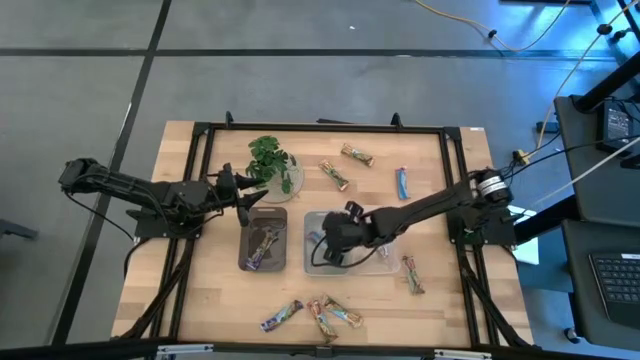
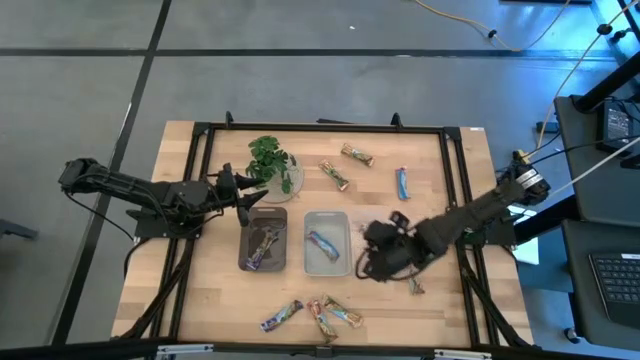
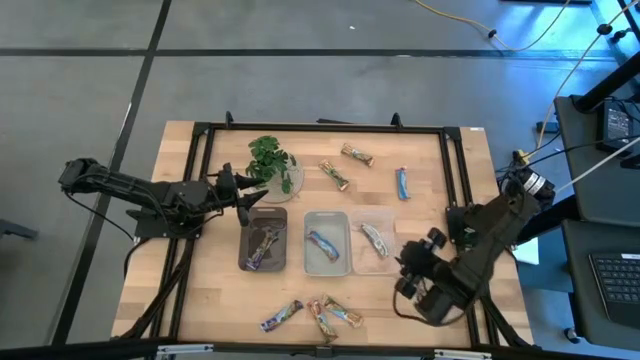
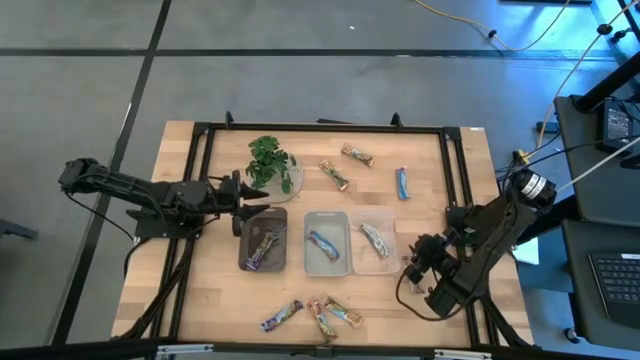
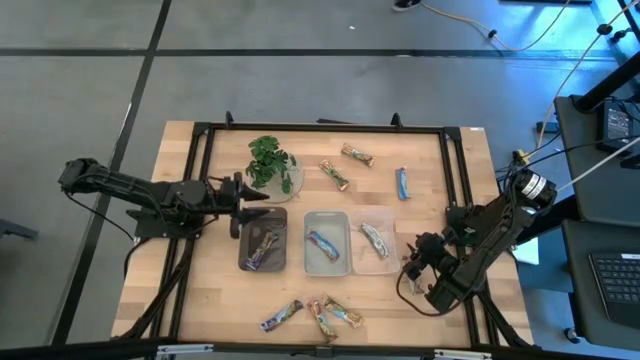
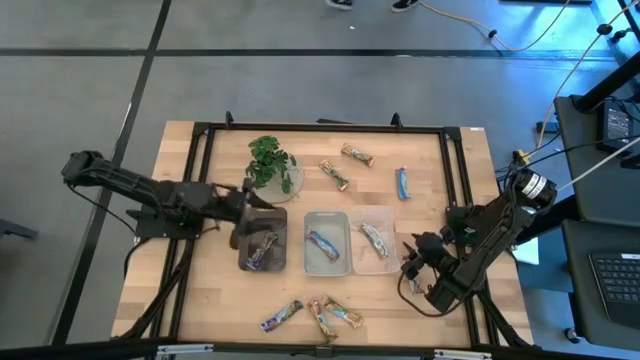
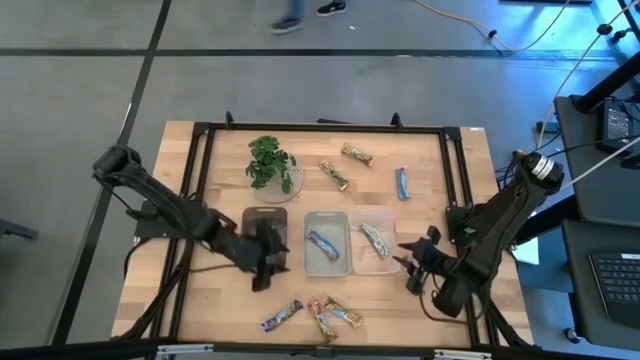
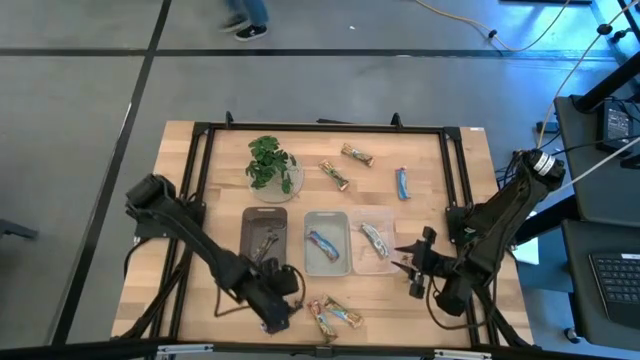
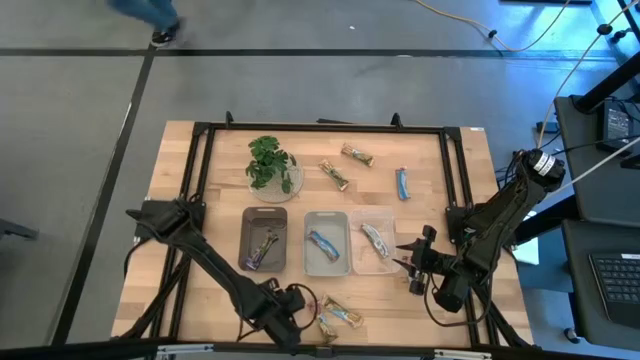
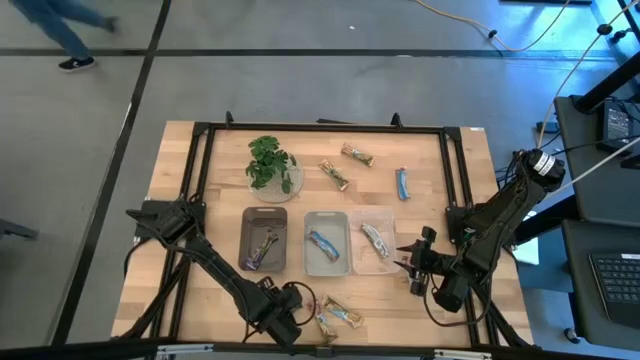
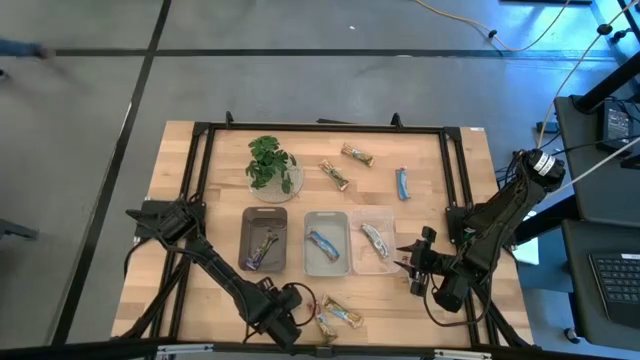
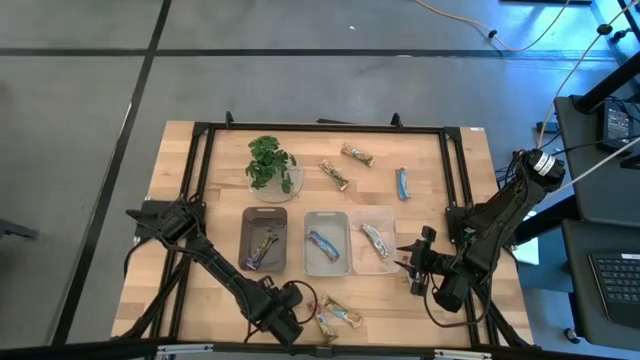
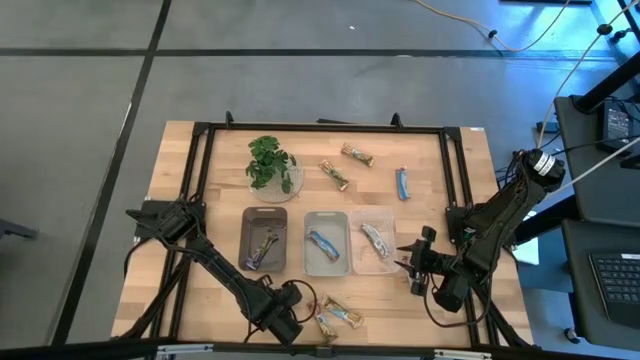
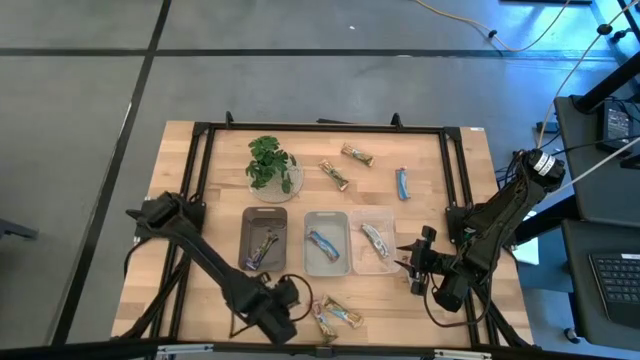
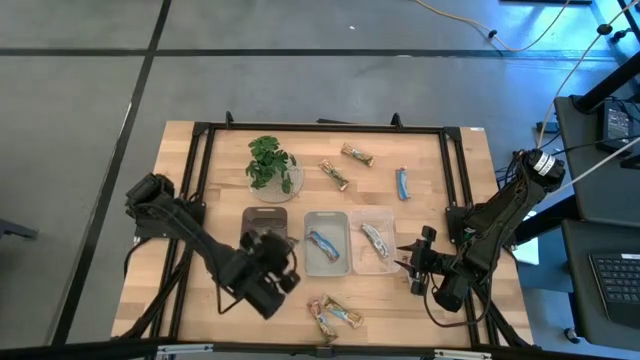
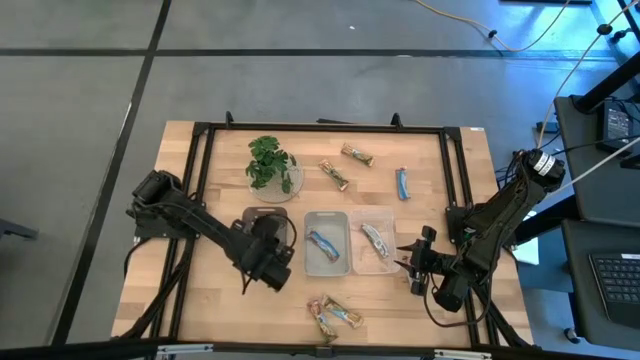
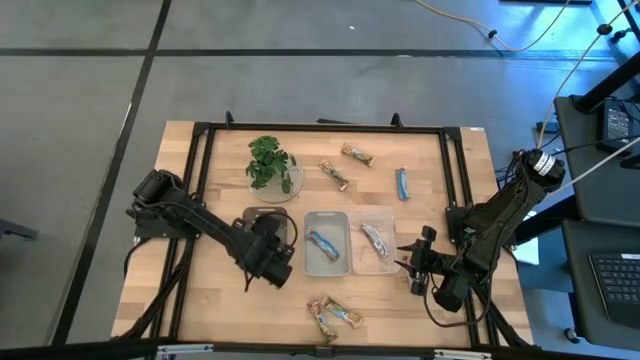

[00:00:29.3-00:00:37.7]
Task: Pick and place Granola Bars by type
Put the blue granola bar into the black bin

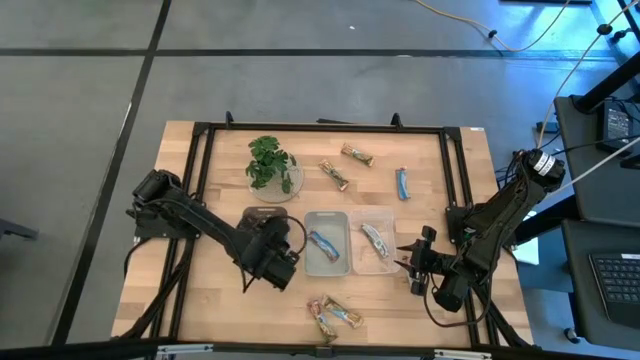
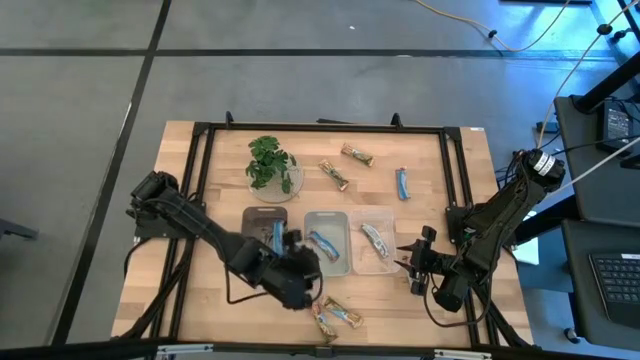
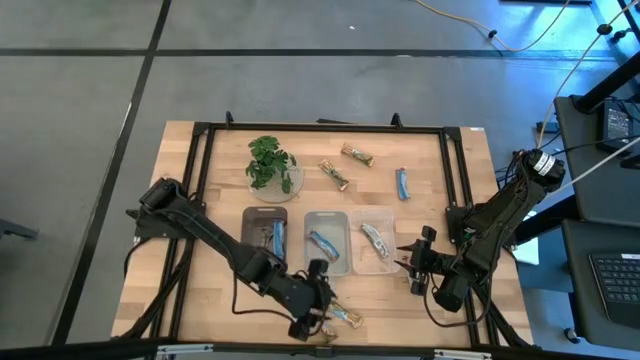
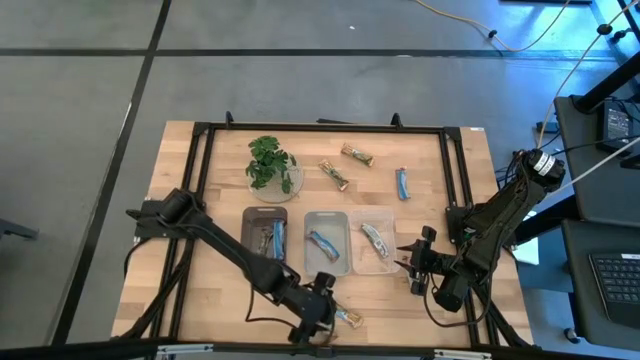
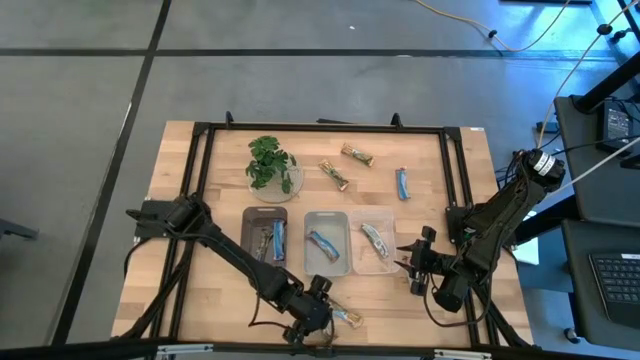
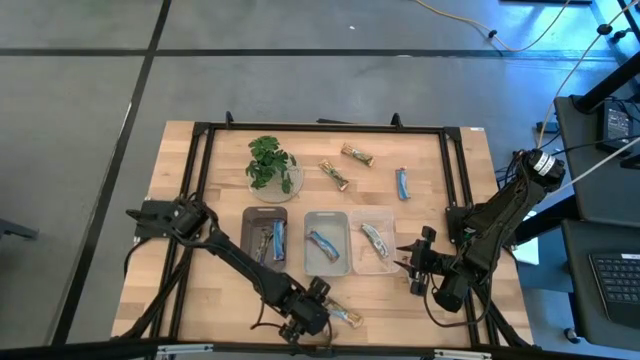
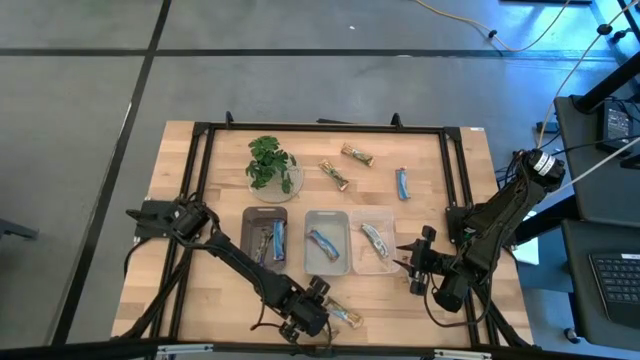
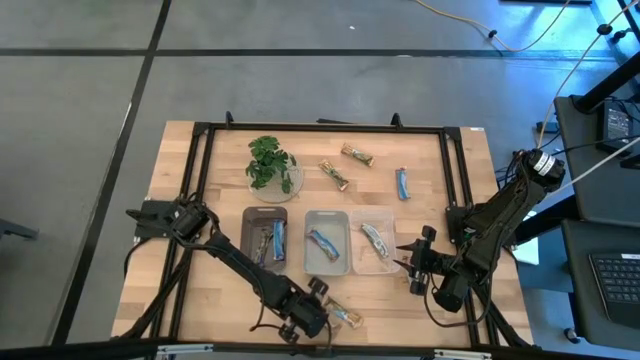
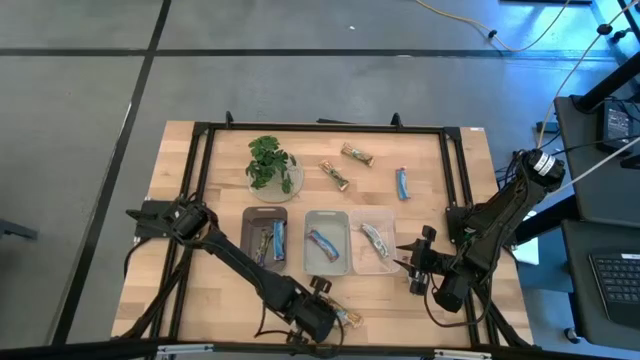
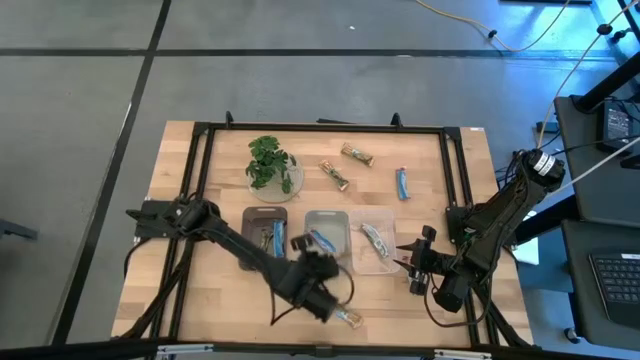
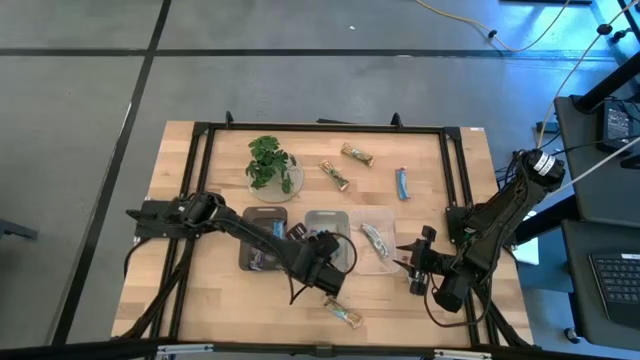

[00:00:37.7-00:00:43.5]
Put the red granola bar into the grey bin

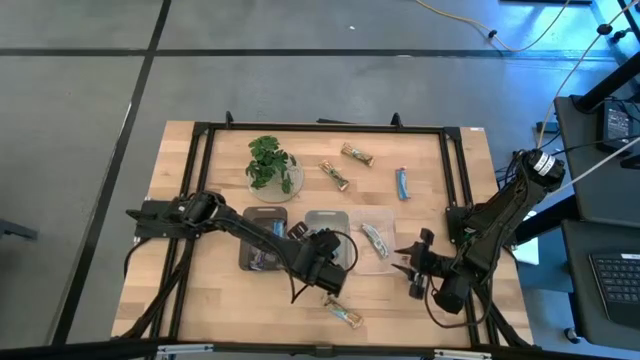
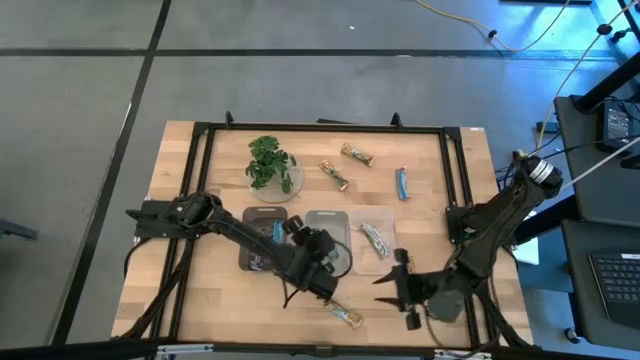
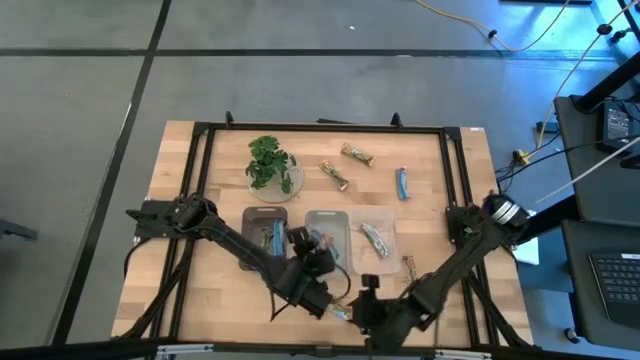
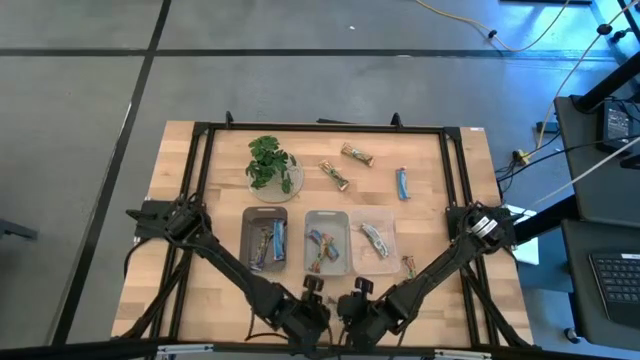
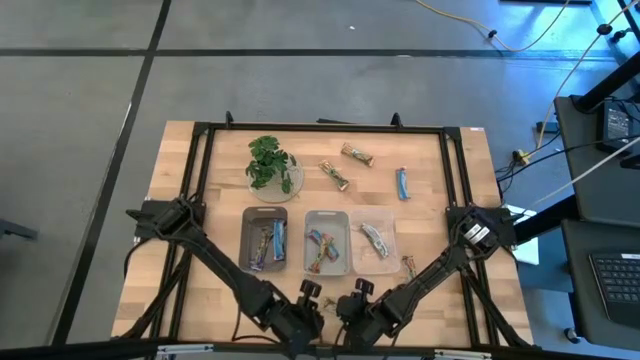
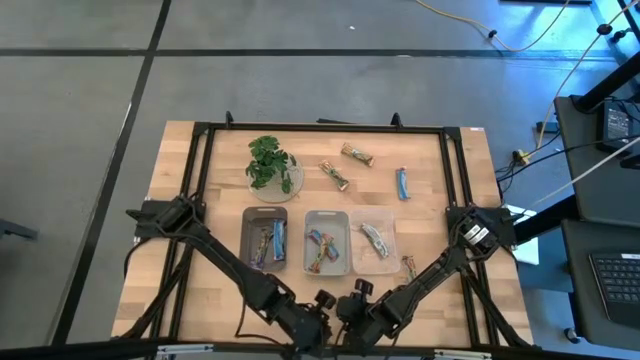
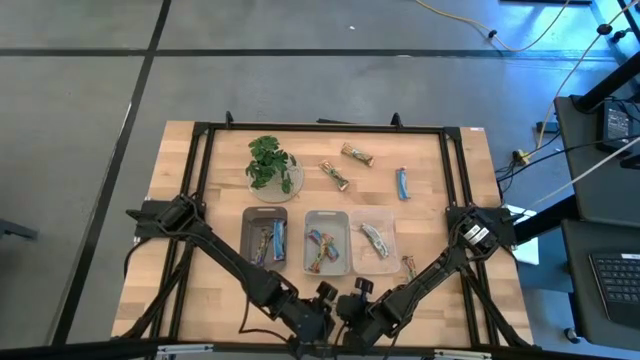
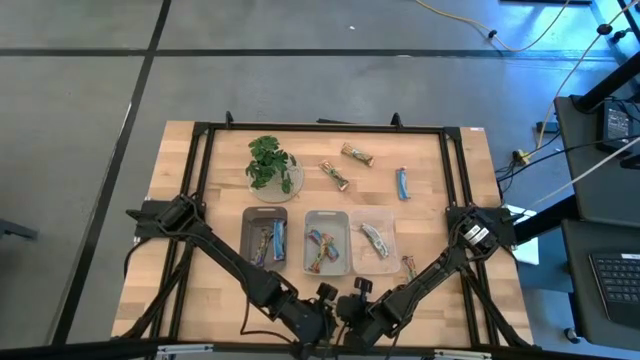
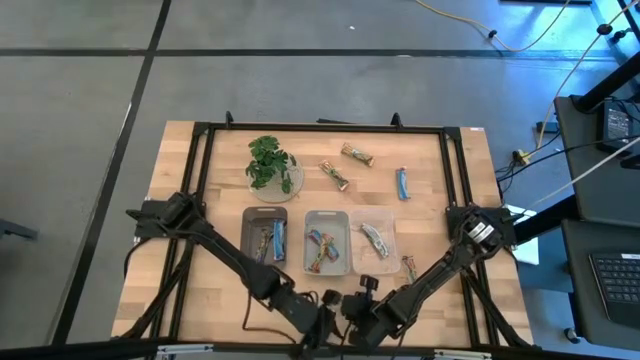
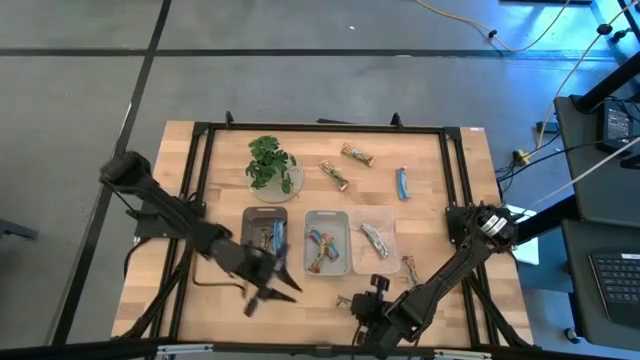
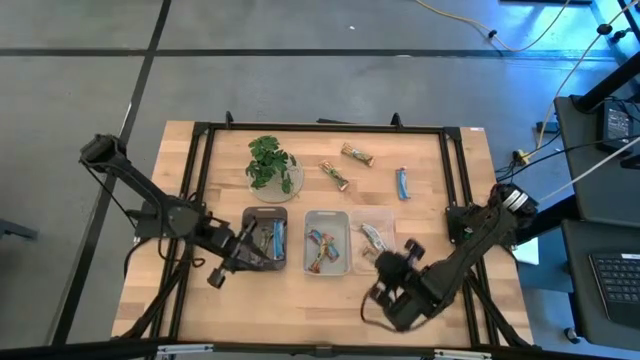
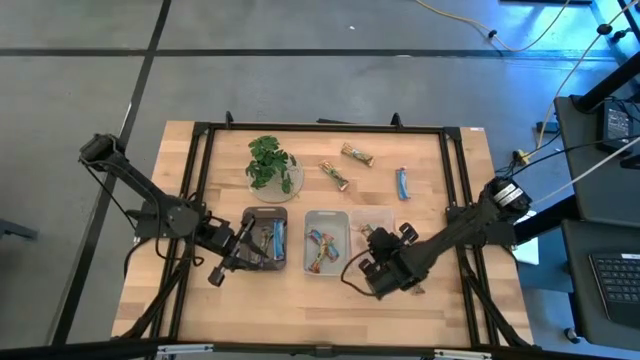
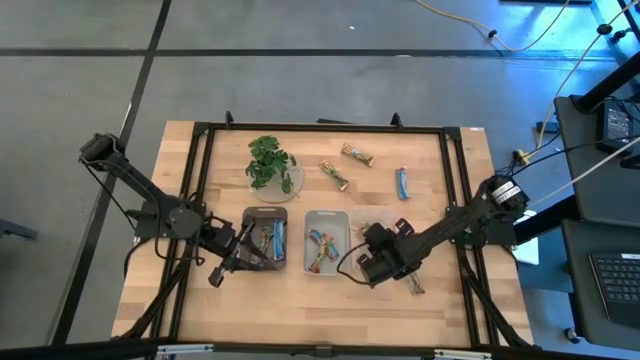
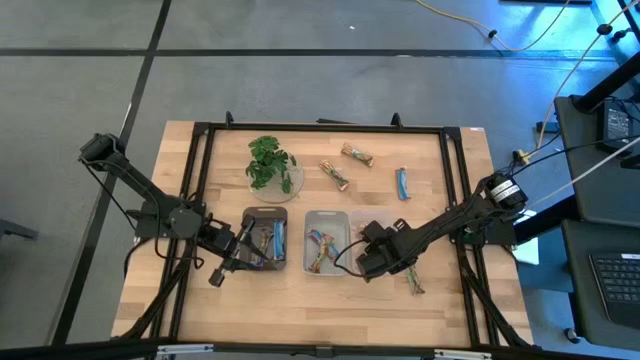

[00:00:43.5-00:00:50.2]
Put the orange granola bar into the transparent bin
